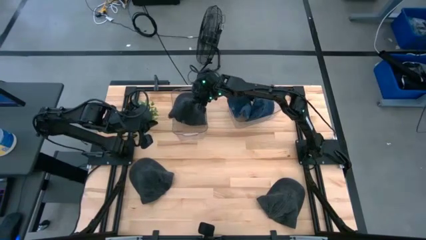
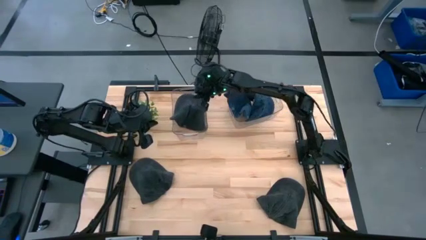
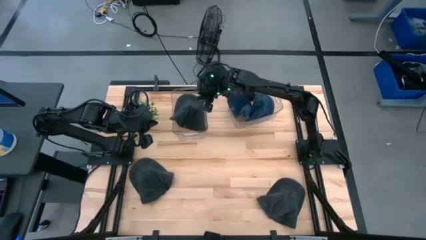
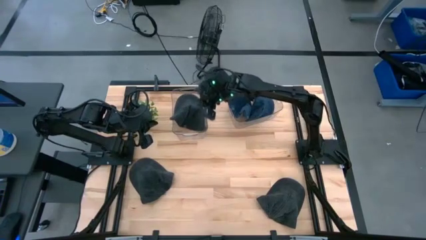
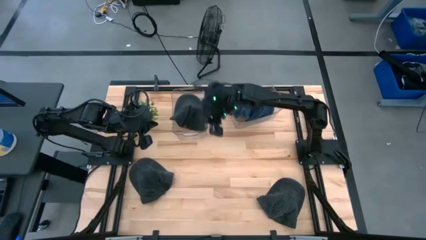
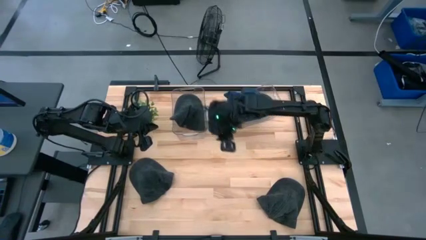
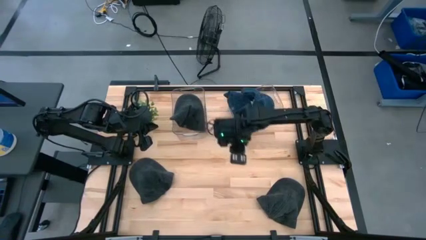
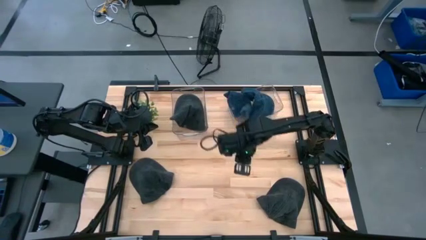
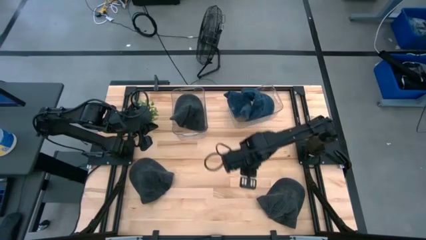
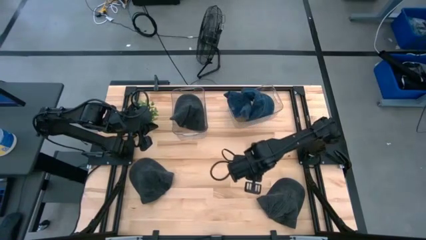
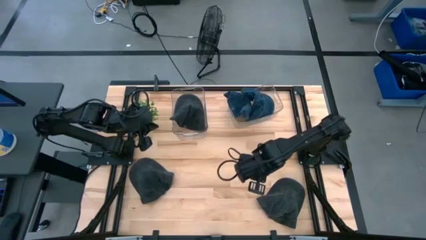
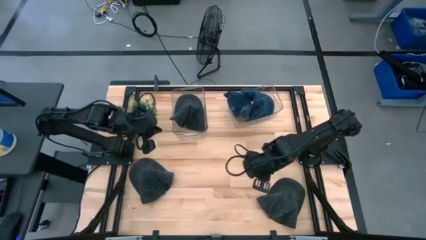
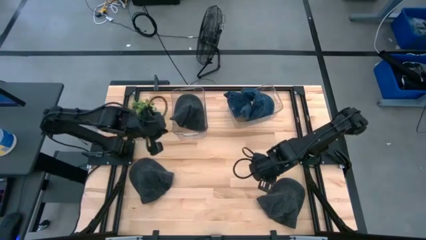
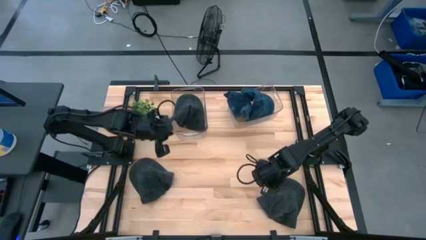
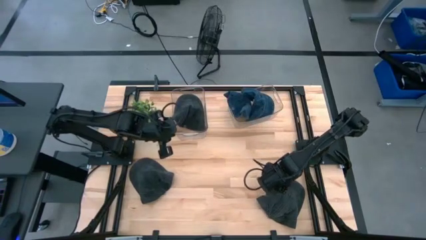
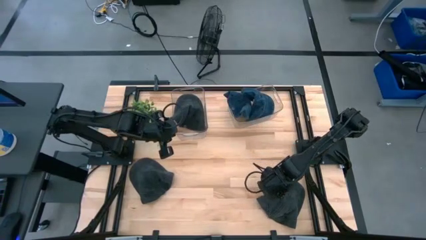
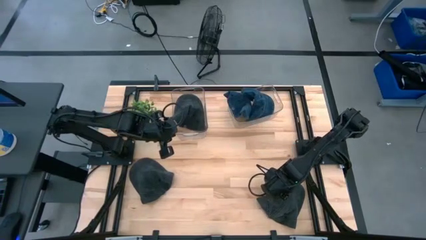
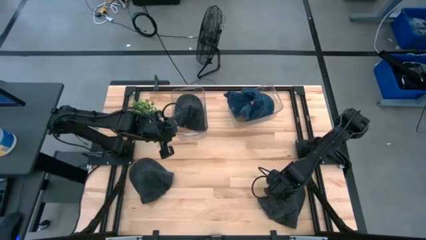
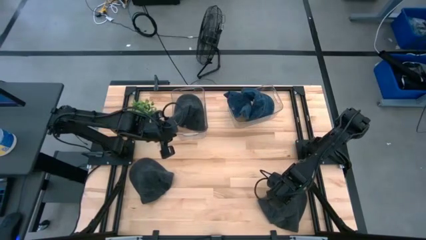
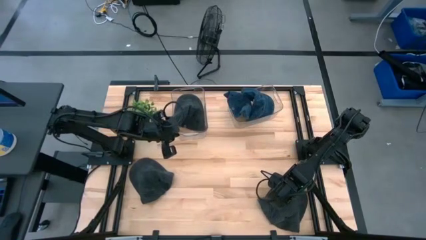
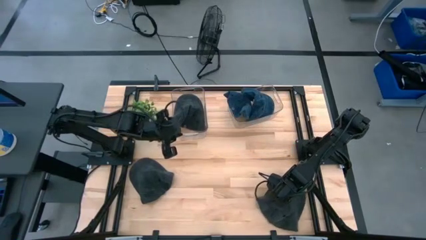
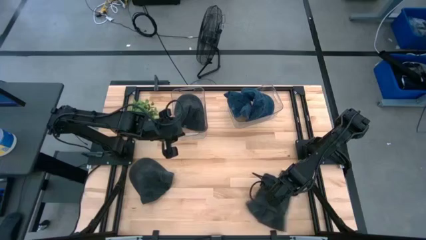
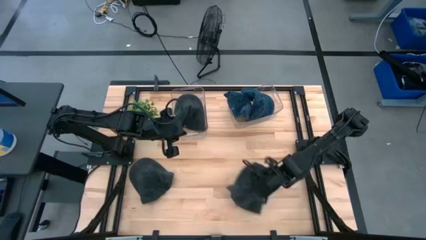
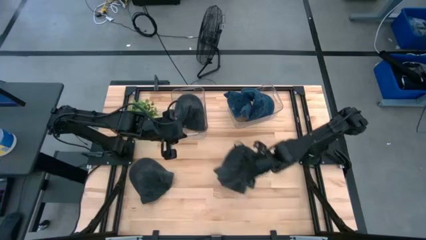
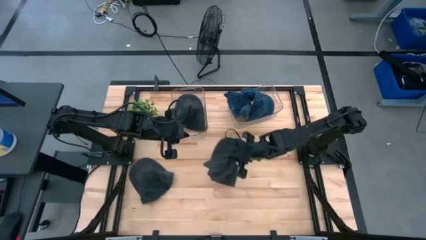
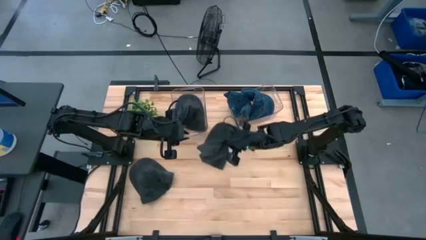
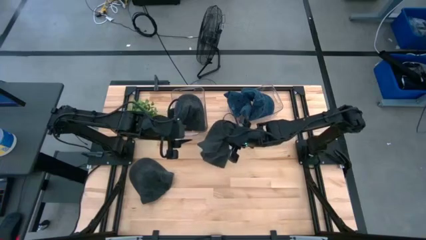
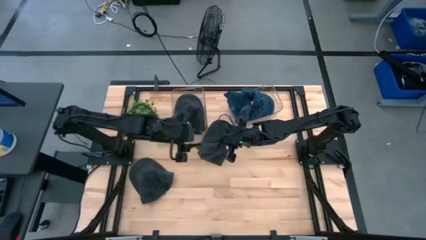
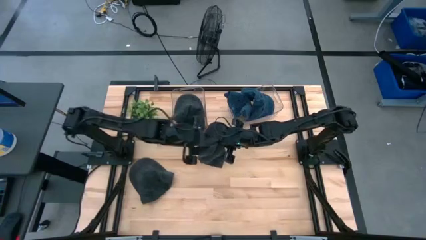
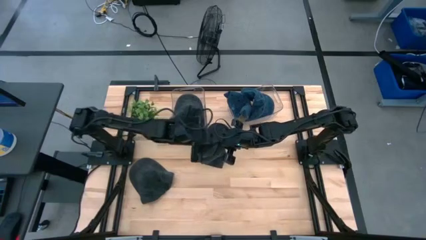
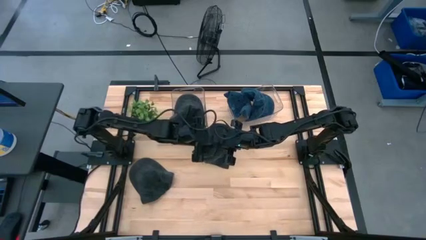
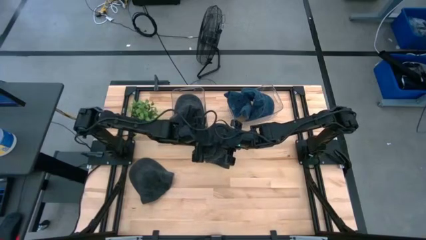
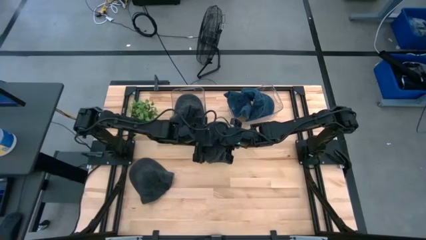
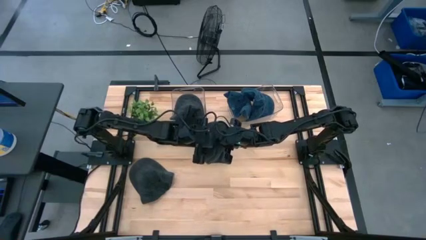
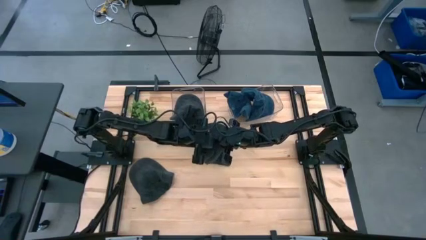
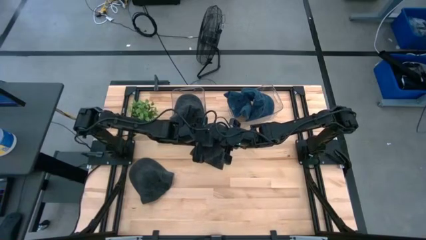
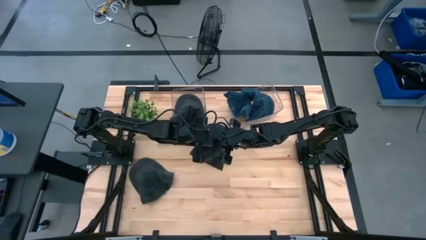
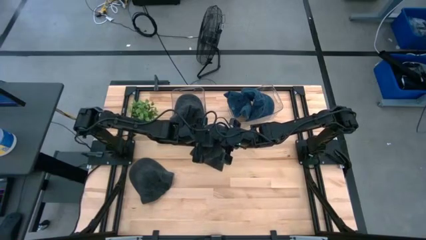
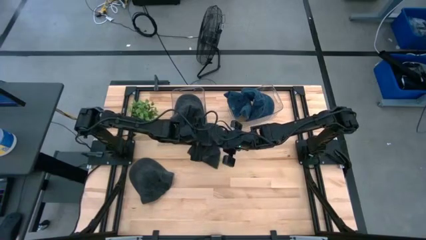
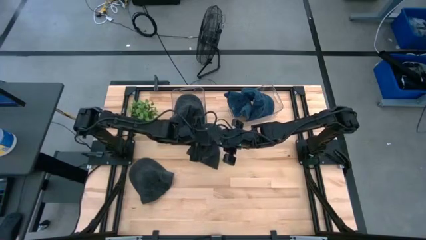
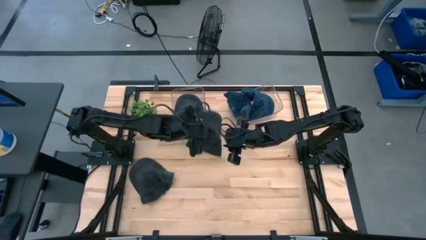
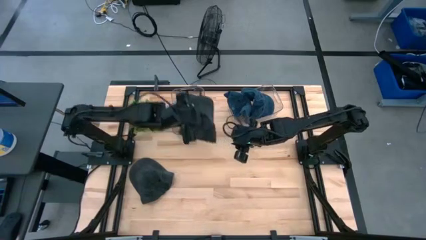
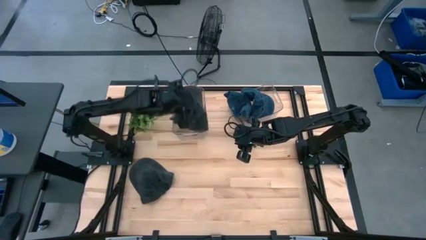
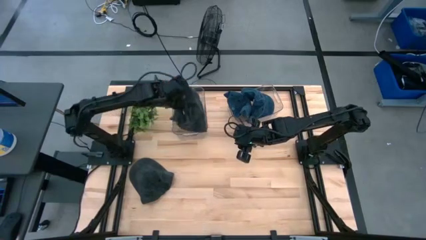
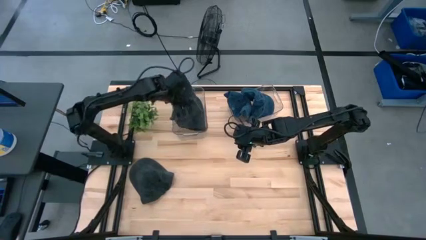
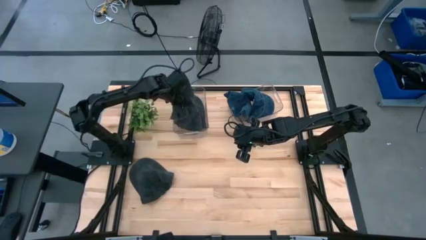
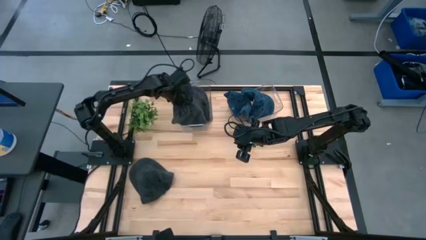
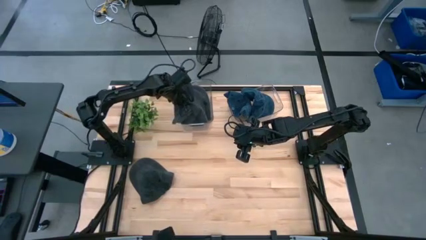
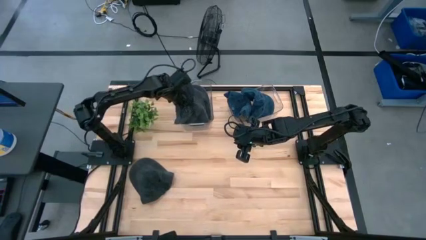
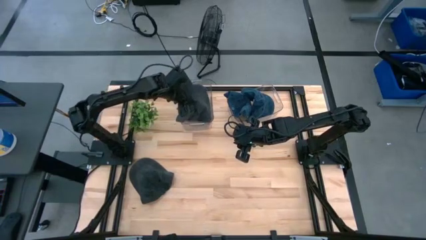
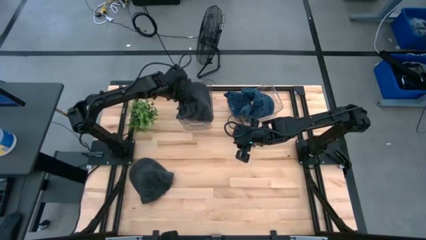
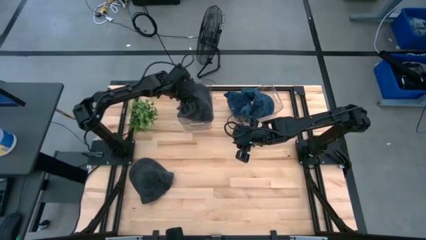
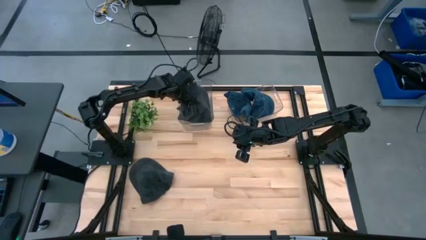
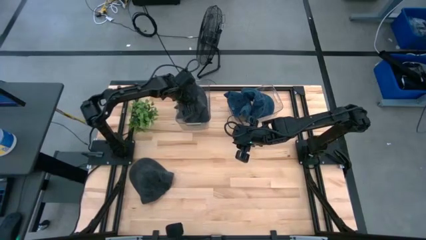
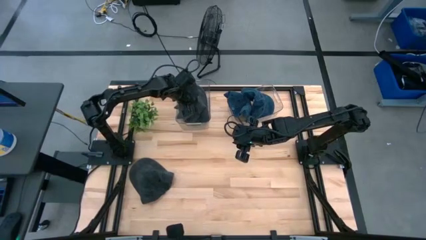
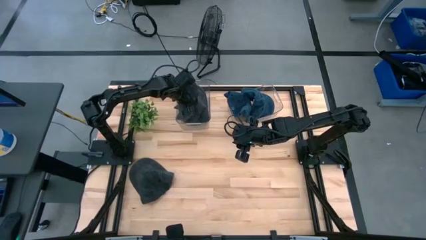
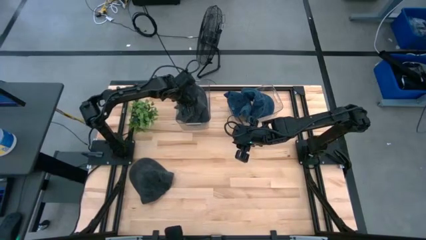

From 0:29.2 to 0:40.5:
Task: Pick & Place hat
Put the right black cap into the left transparent bin

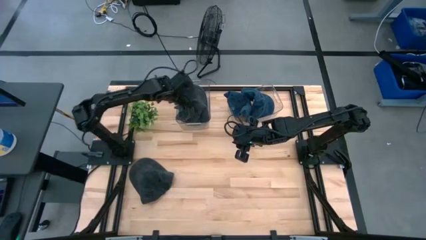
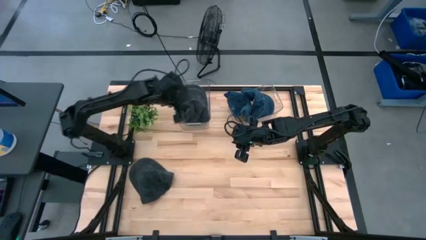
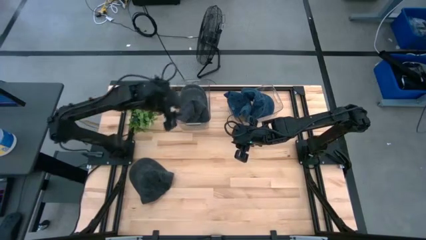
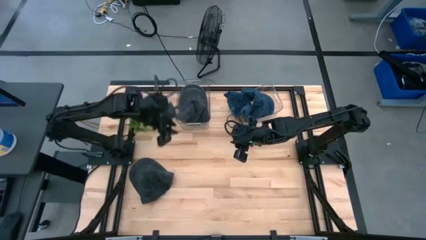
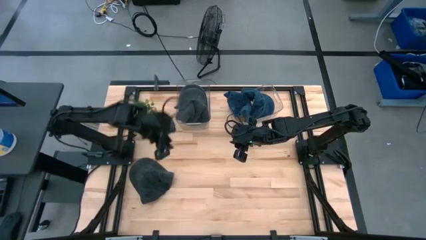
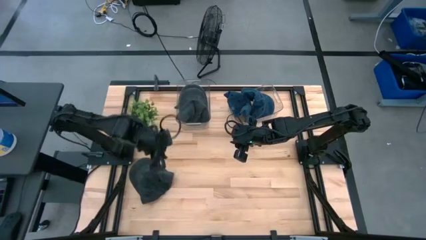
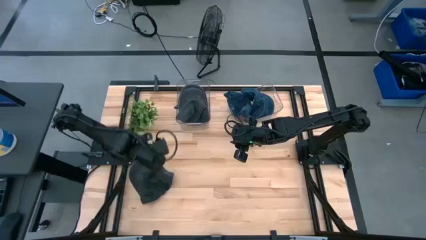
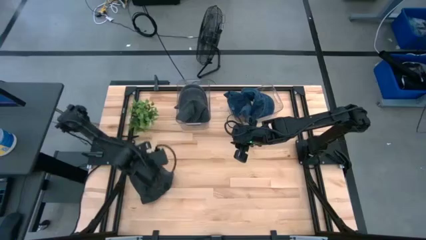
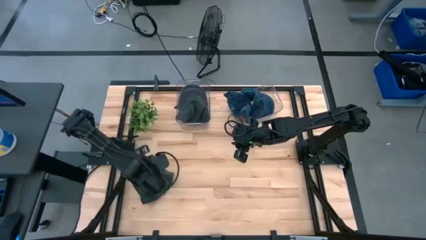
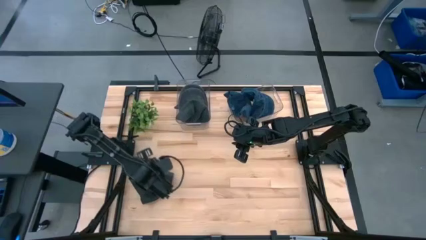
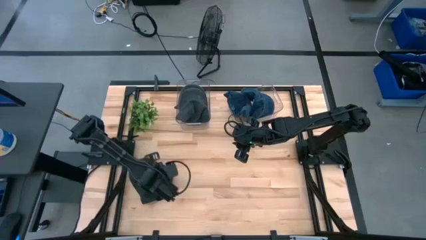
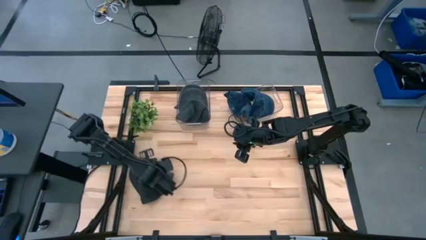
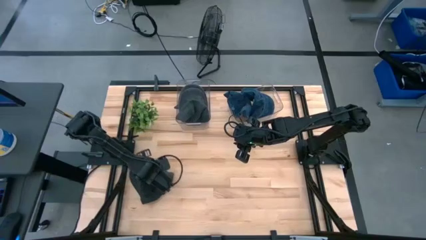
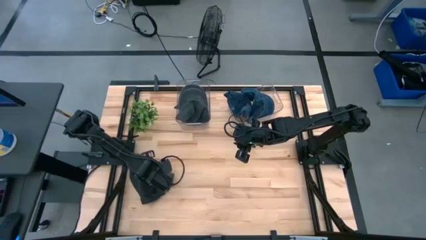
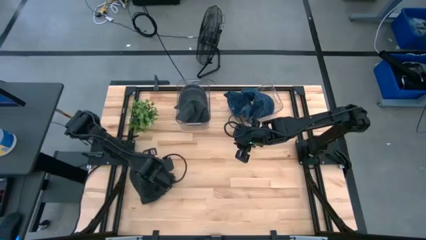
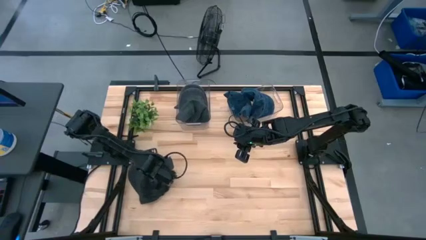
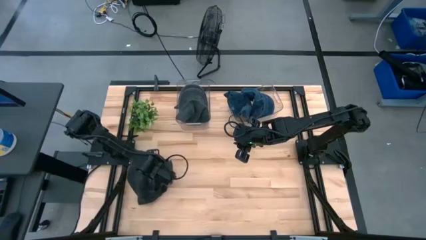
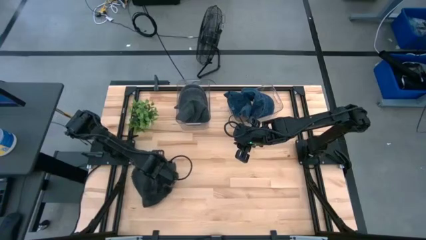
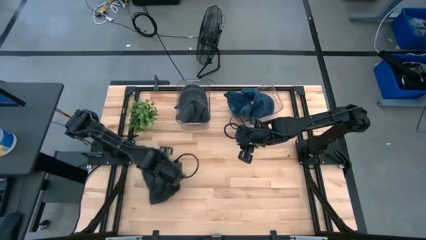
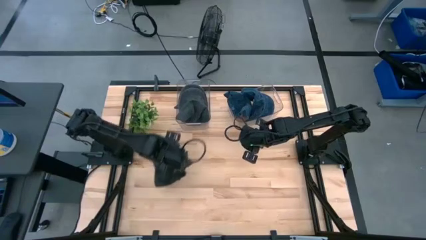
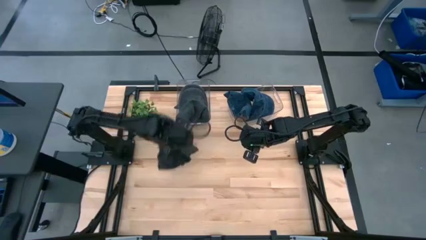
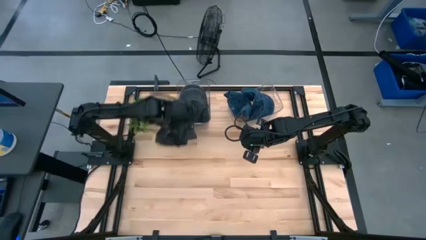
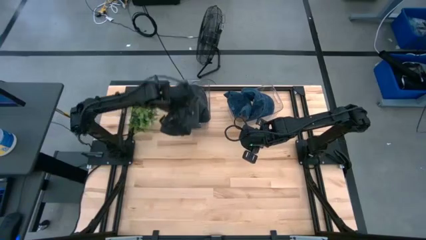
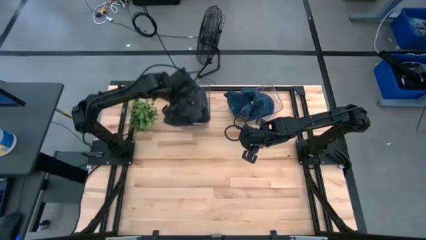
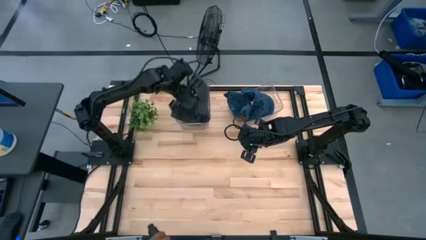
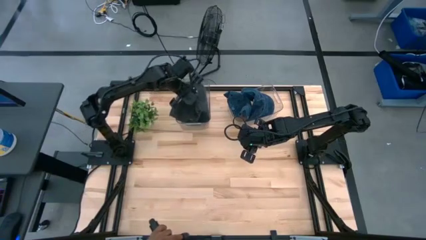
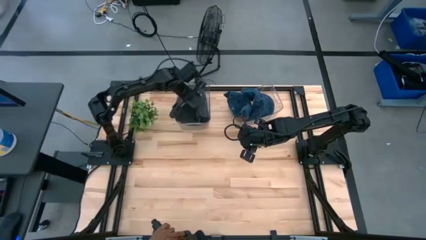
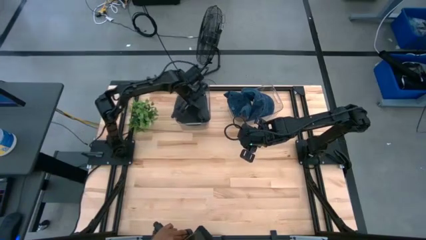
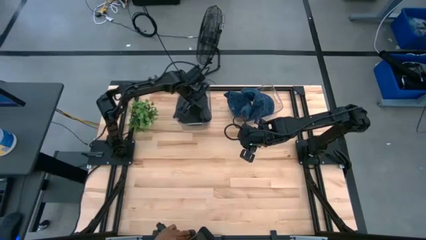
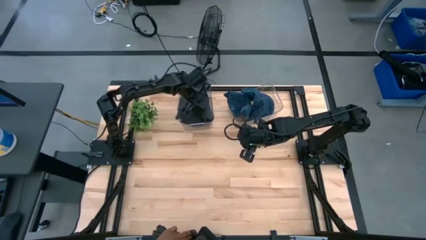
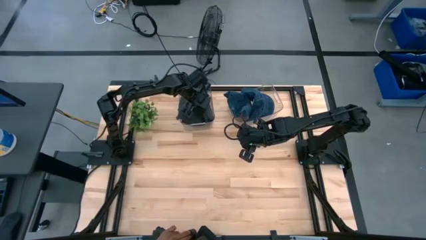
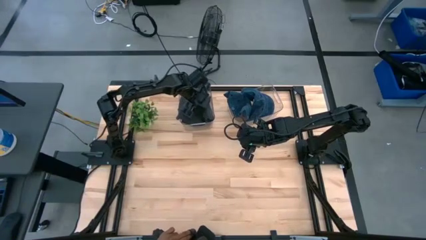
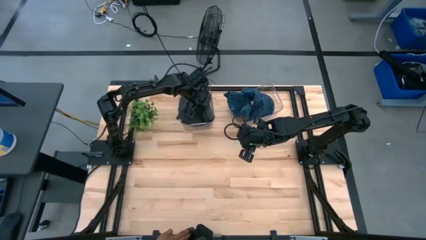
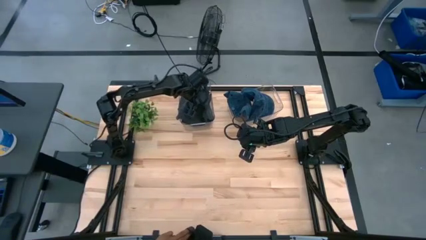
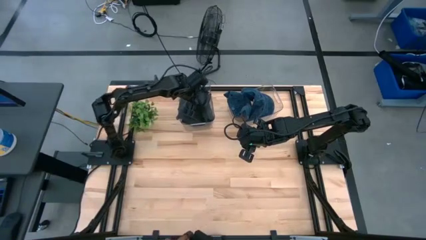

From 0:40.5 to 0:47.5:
Put the black cap into the left transparent bin
